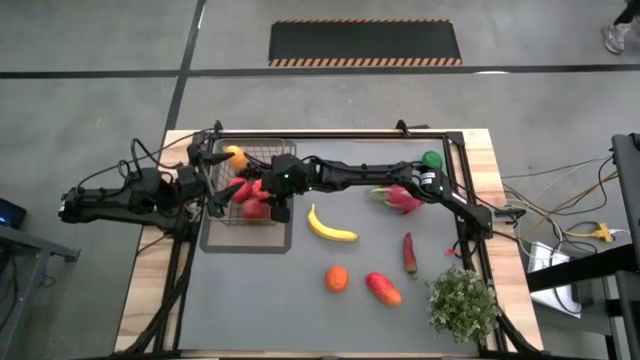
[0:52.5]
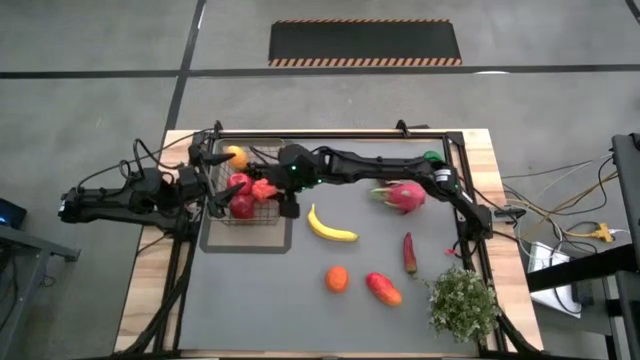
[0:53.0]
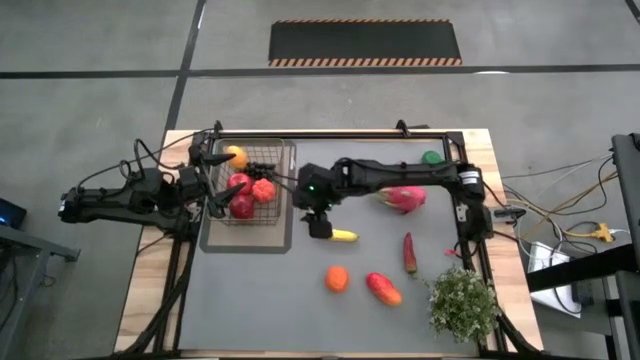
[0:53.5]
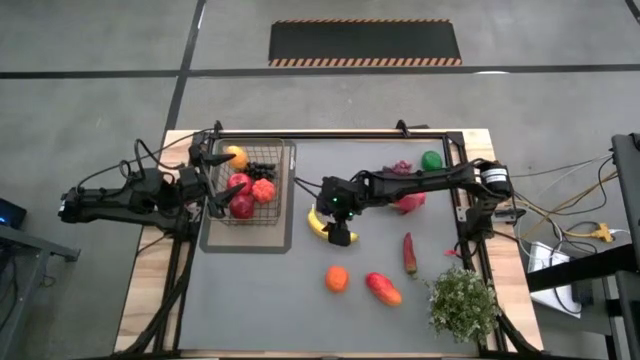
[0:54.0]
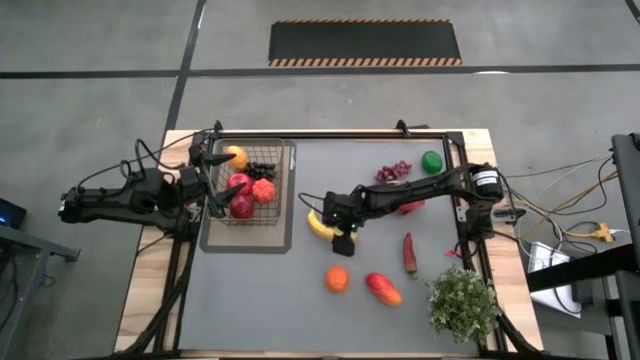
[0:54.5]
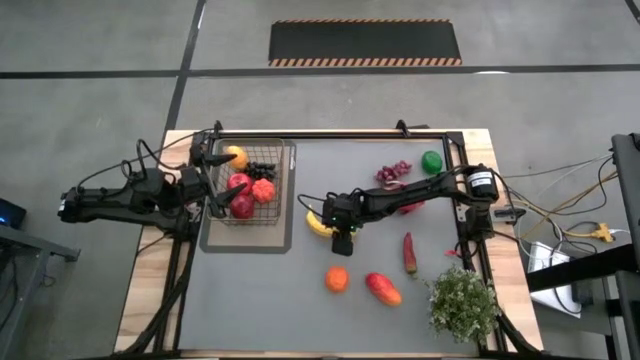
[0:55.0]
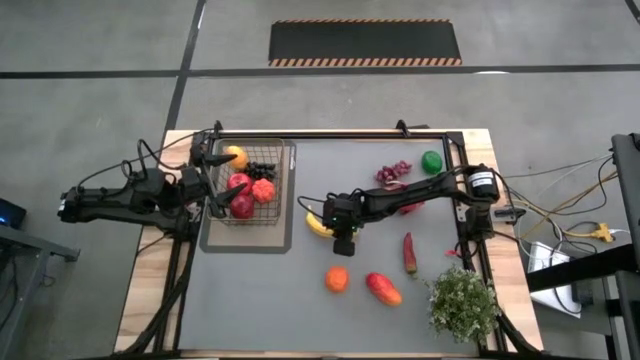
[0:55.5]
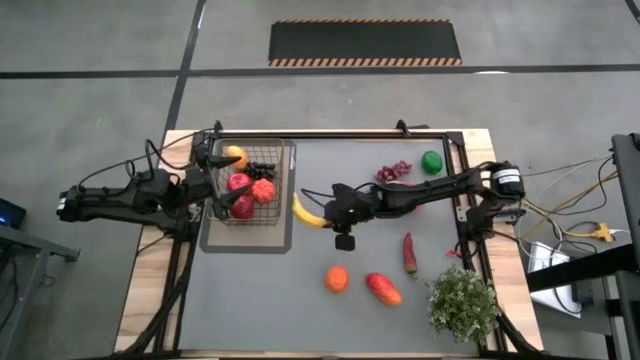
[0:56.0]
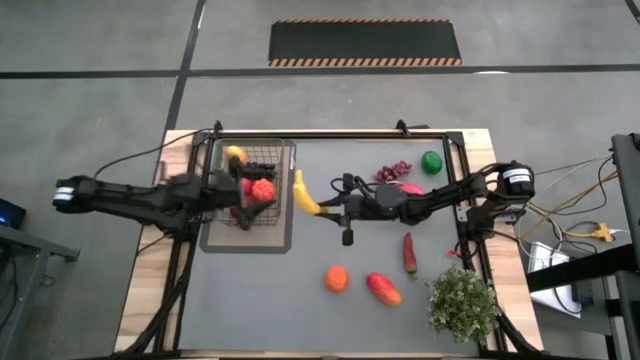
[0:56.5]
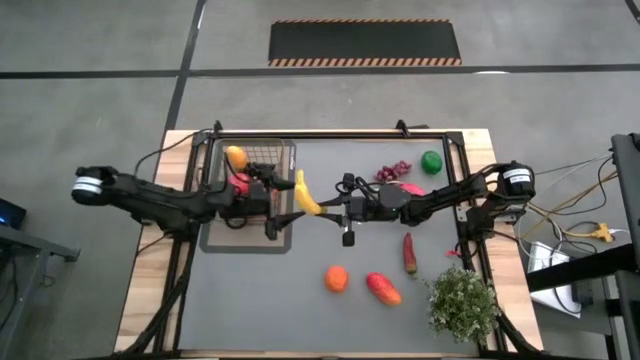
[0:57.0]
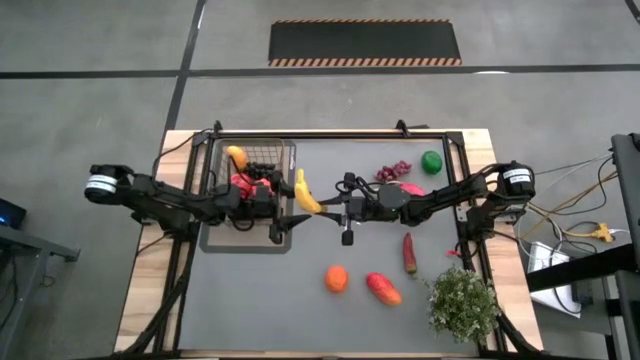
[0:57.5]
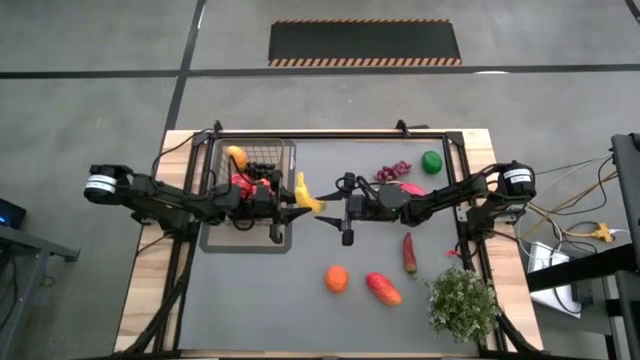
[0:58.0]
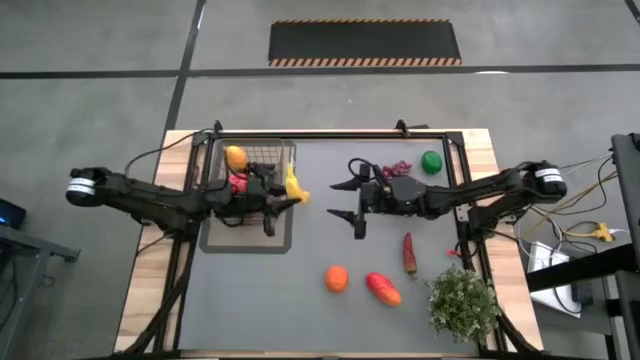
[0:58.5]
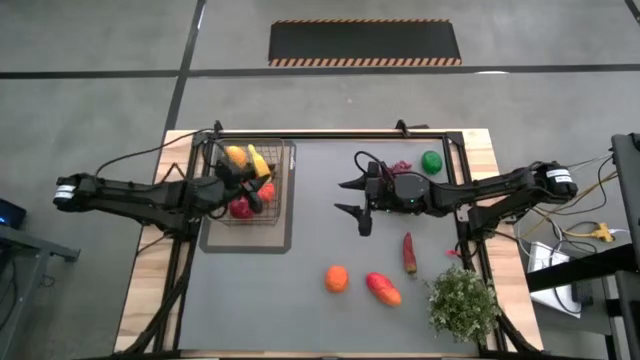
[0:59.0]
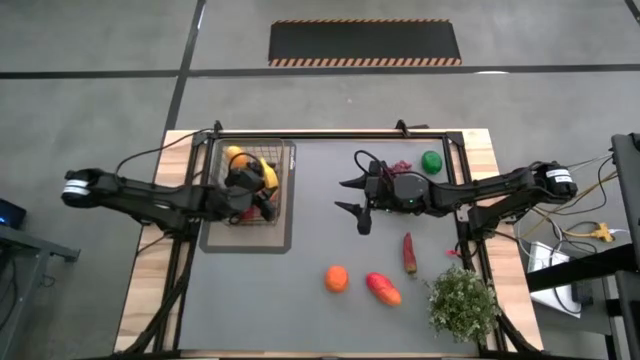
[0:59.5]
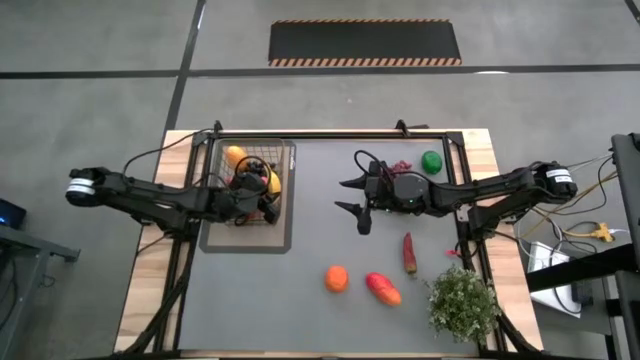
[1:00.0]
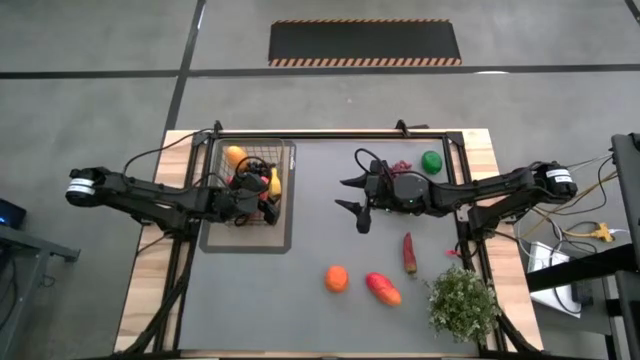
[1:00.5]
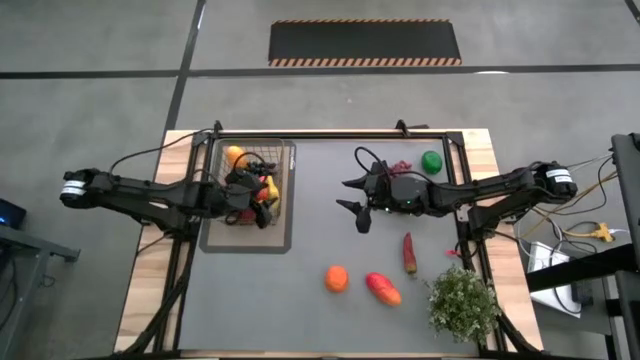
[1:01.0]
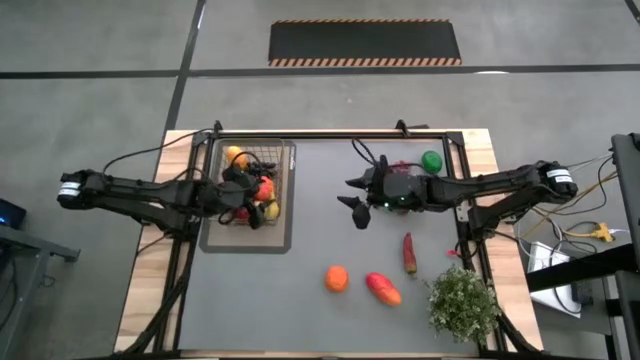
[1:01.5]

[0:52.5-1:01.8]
Task: Build produce basket
Put the yellow banana into the gold wire basket

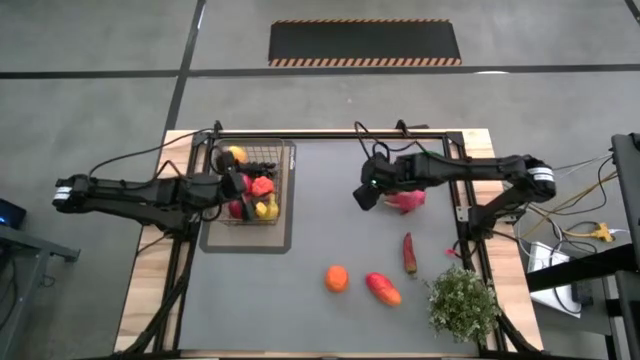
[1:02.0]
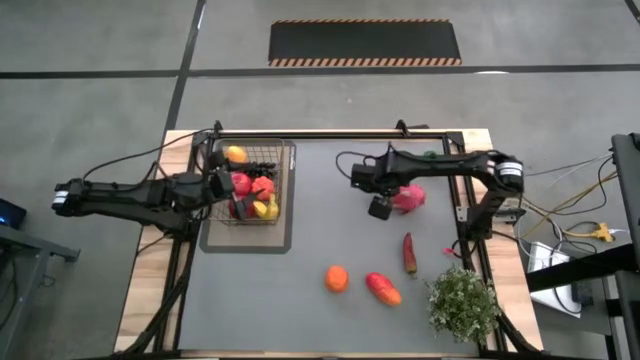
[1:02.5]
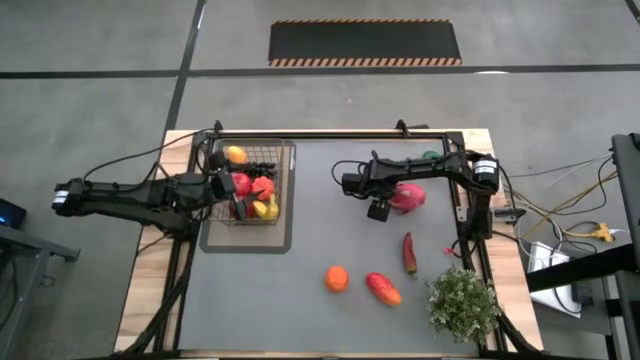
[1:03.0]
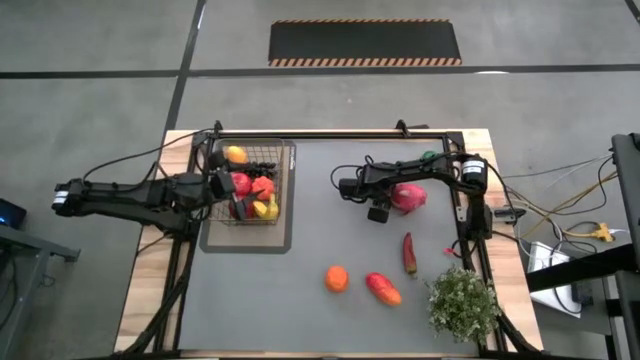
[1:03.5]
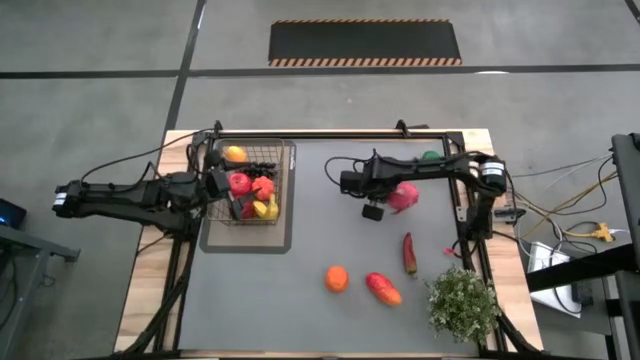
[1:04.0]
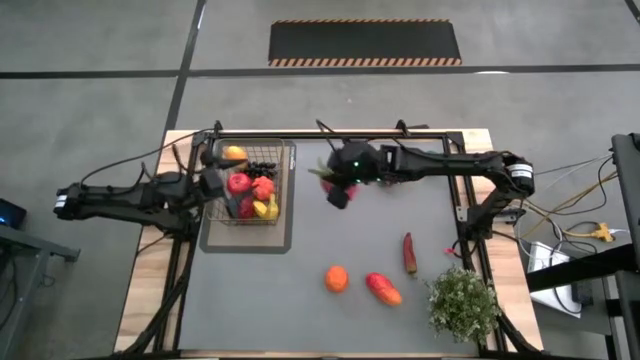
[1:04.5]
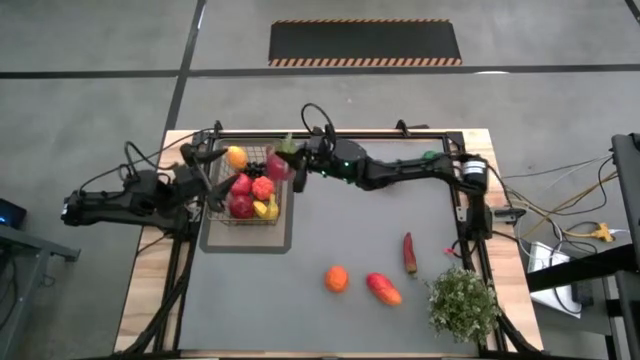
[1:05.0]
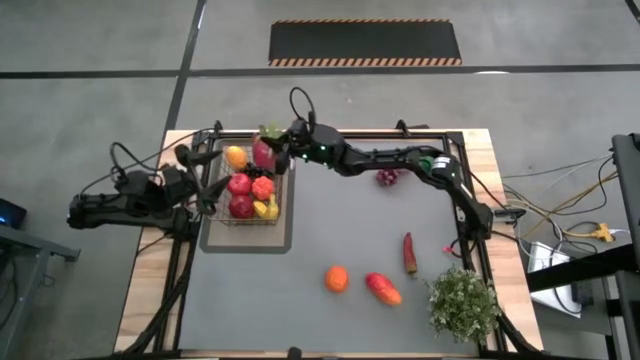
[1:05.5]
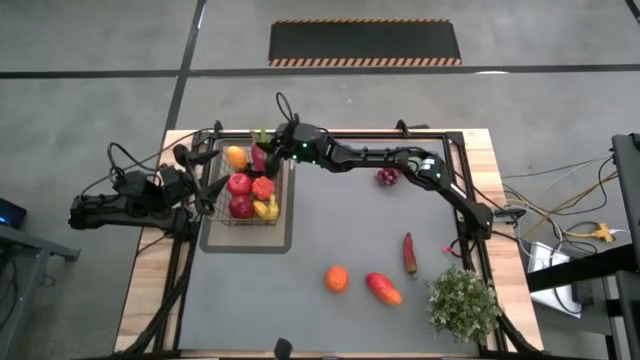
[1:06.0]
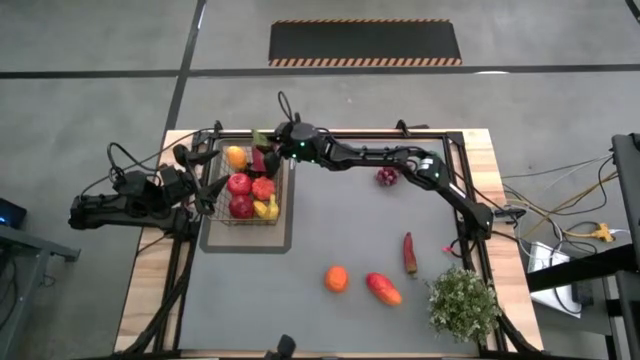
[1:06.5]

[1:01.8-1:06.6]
Put the pink dragonfruit into the gold wire basket

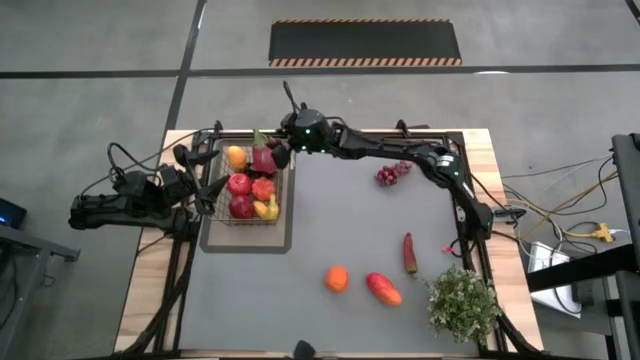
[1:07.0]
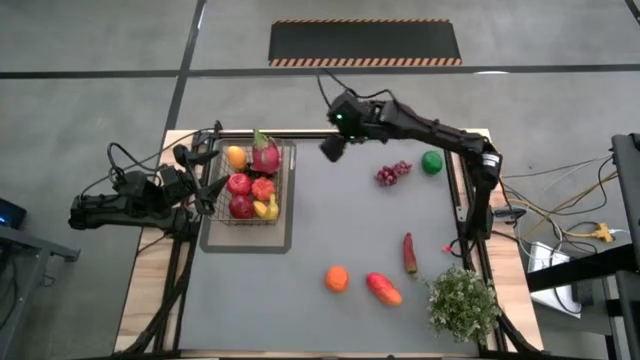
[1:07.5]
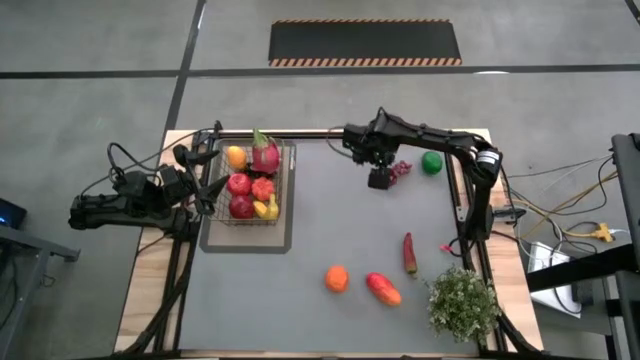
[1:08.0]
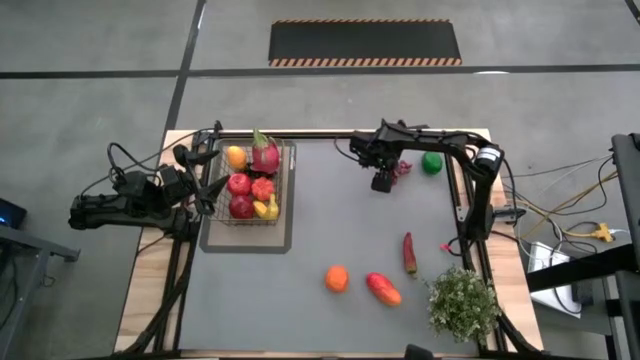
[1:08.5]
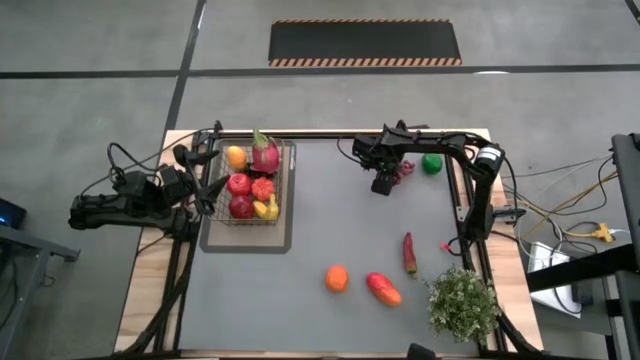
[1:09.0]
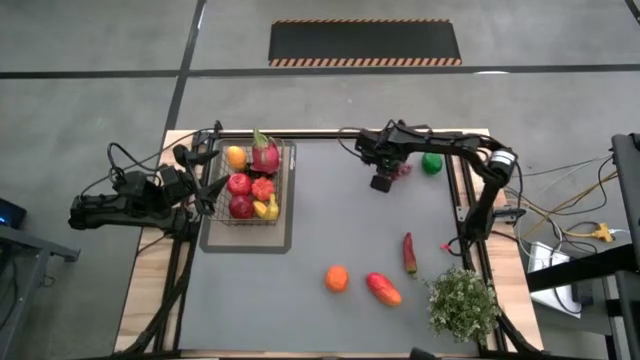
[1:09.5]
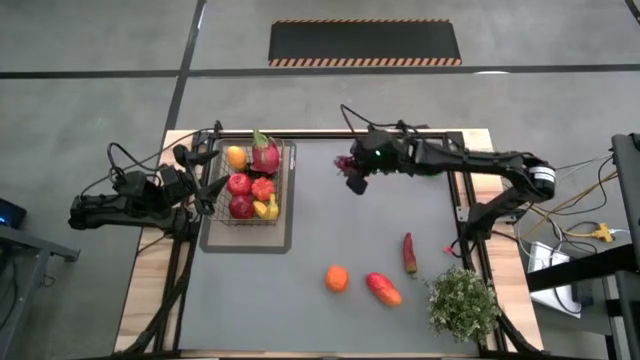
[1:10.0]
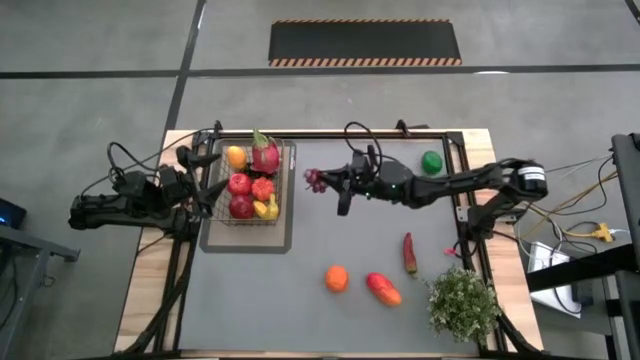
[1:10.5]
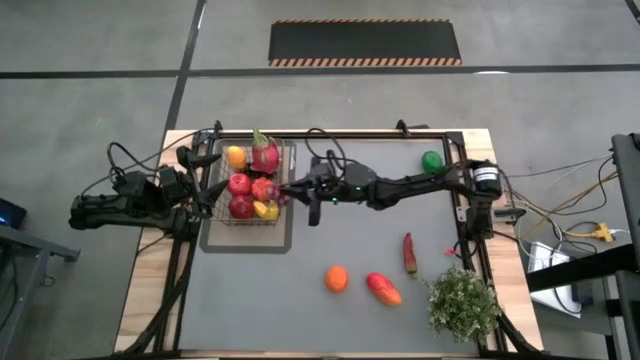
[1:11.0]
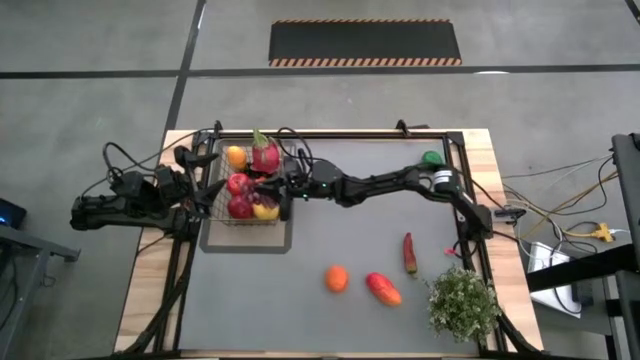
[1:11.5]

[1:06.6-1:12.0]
Put the red grapes into the gold wire basket

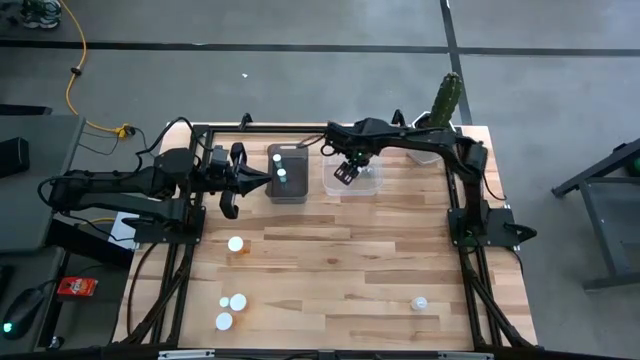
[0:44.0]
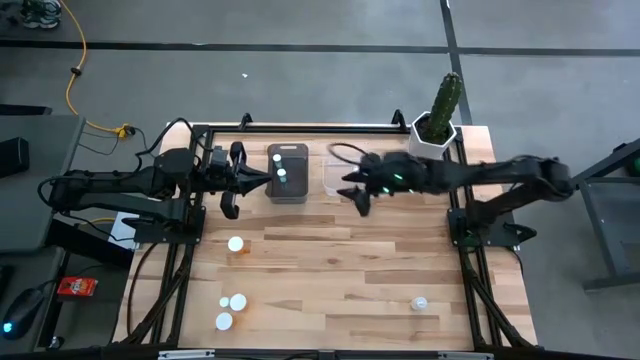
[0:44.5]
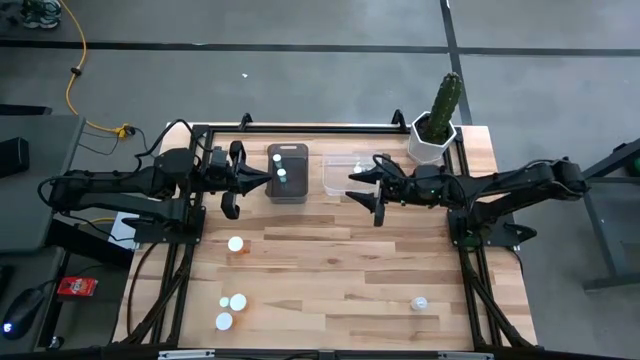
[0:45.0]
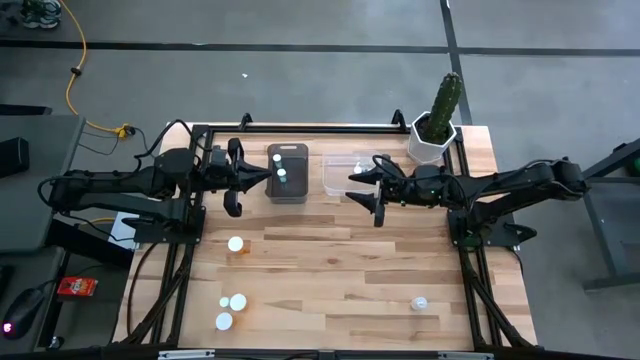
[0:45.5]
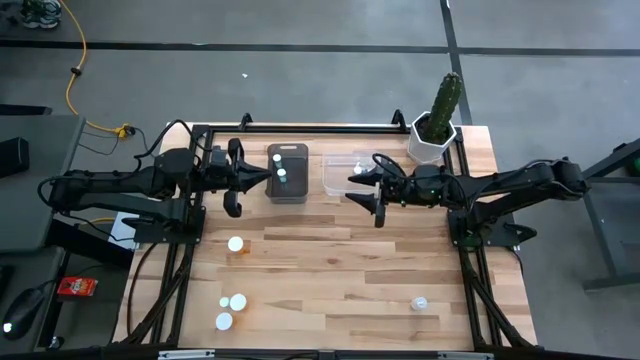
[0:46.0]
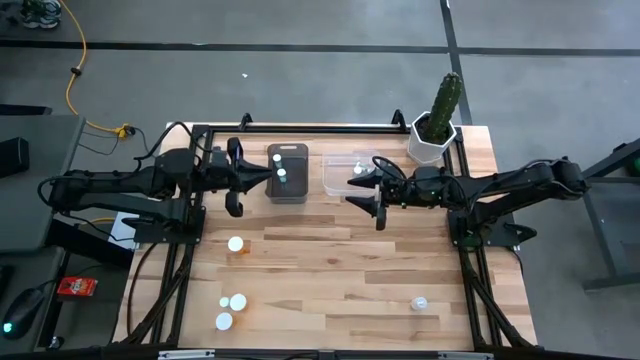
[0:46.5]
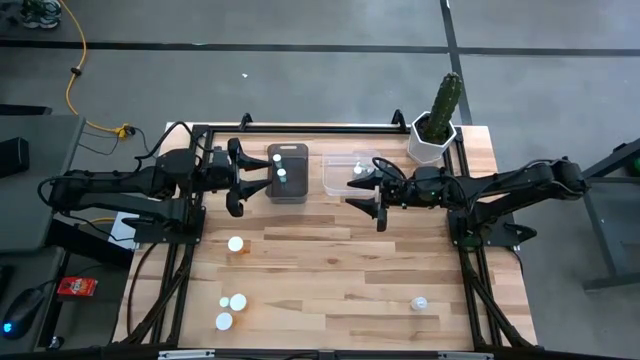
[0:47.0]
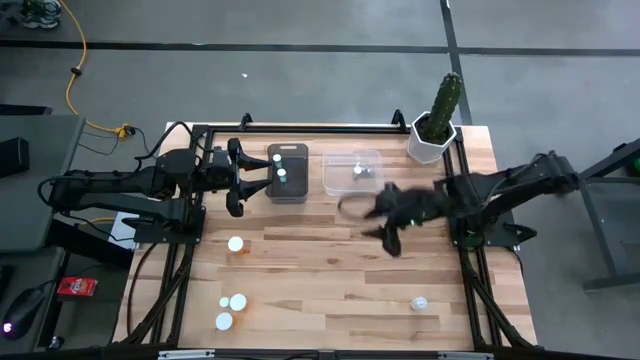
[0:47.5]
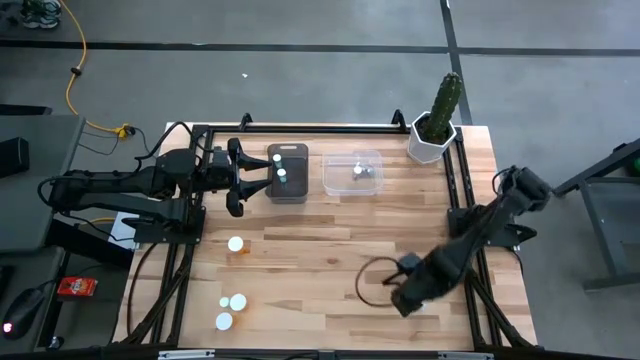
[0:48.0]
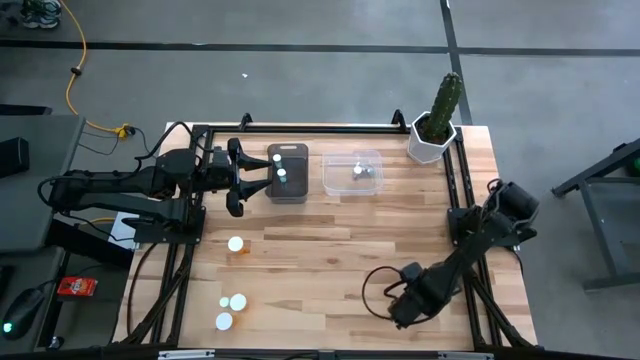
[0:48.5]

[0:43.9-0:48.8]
Task: Pick and place medicine bottles into bin by pill shape (circle, oval)
Put the white tablet bottle into the black bin
